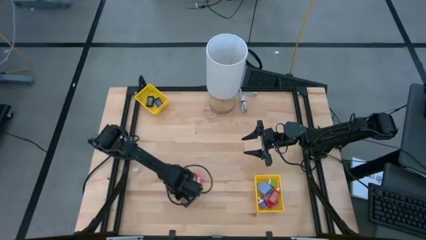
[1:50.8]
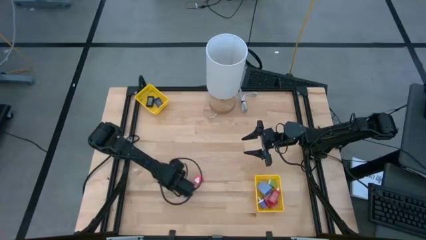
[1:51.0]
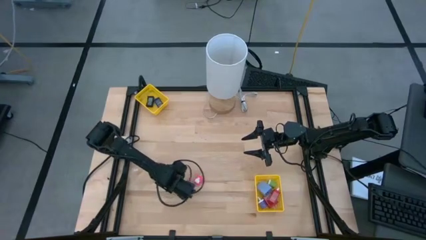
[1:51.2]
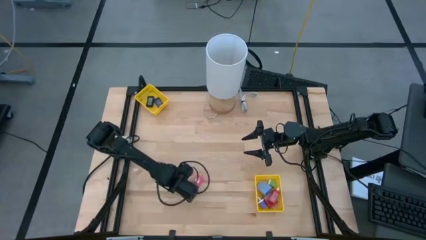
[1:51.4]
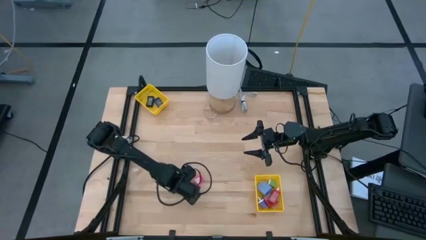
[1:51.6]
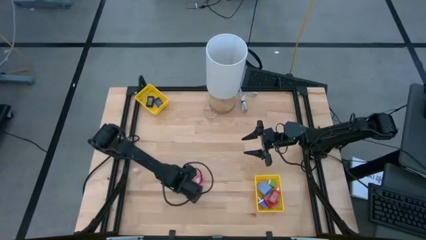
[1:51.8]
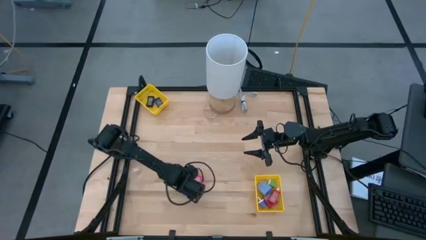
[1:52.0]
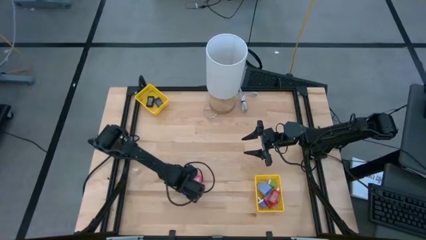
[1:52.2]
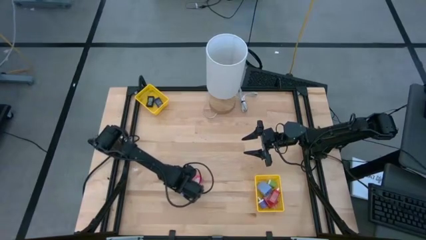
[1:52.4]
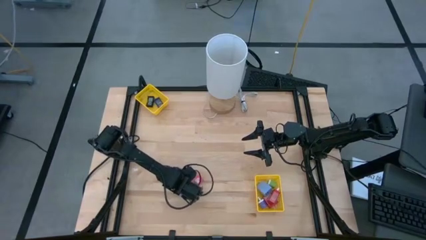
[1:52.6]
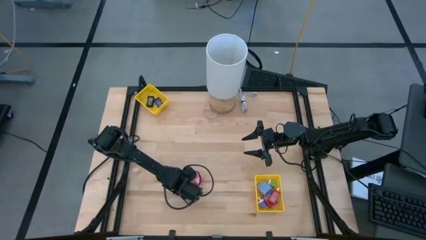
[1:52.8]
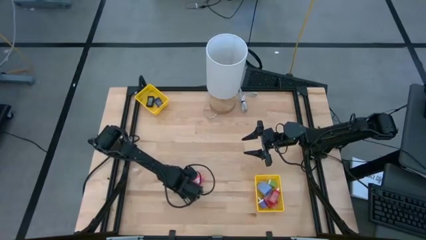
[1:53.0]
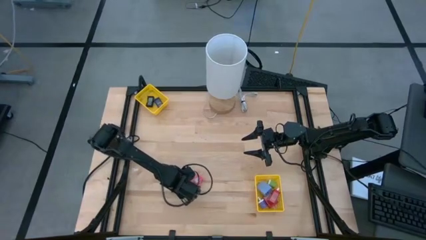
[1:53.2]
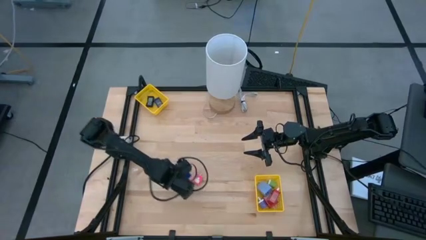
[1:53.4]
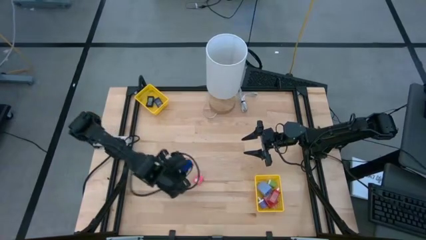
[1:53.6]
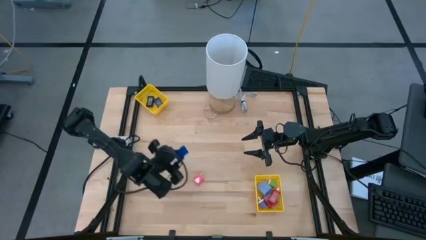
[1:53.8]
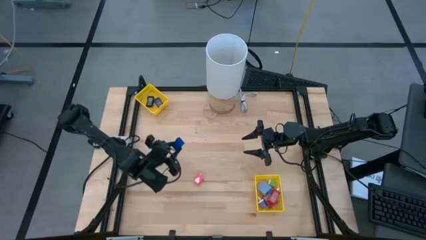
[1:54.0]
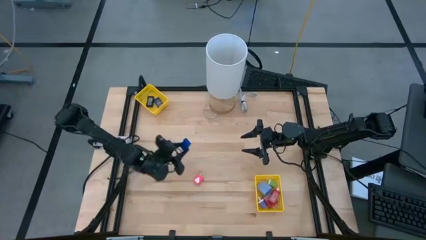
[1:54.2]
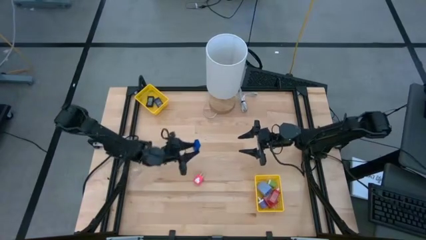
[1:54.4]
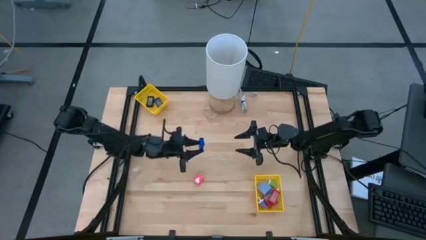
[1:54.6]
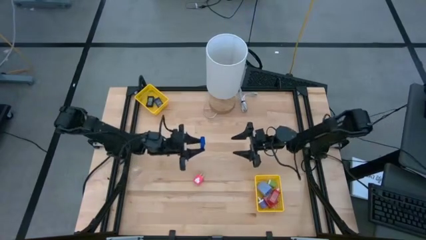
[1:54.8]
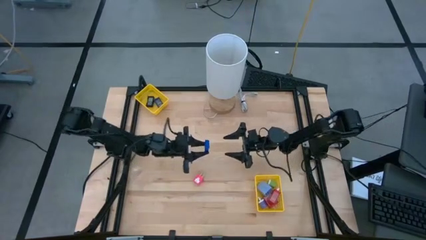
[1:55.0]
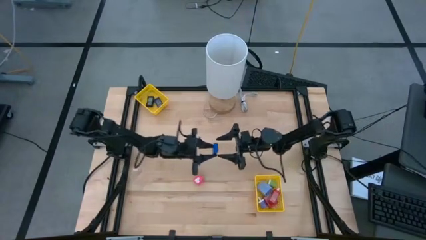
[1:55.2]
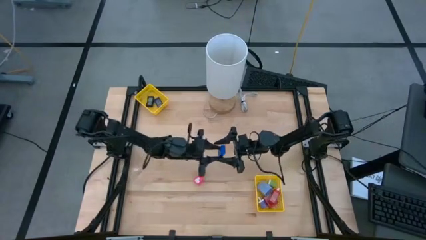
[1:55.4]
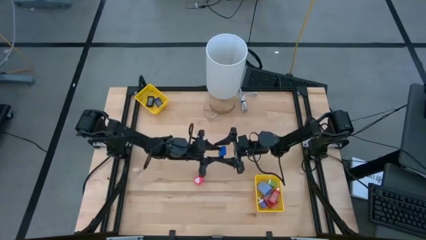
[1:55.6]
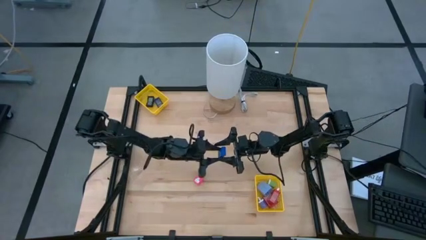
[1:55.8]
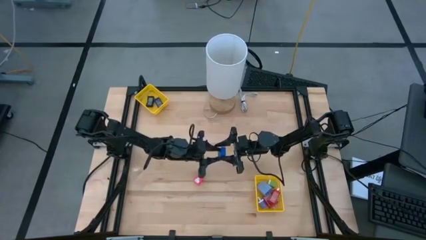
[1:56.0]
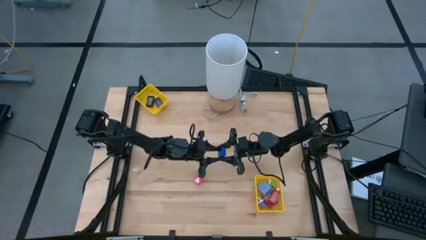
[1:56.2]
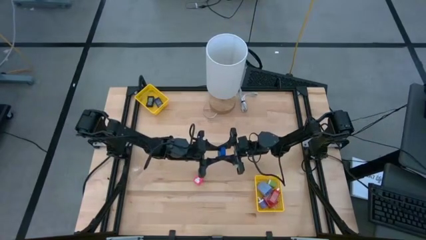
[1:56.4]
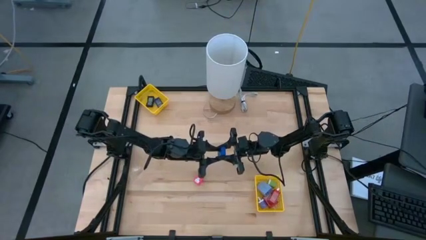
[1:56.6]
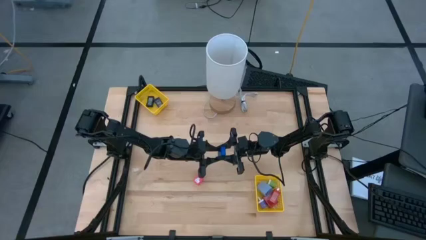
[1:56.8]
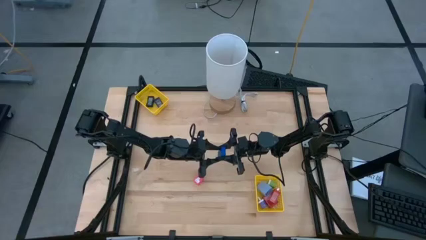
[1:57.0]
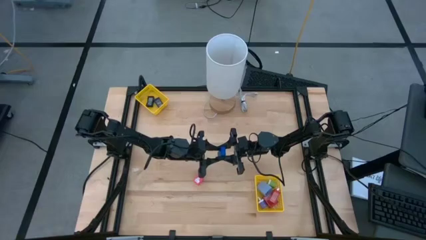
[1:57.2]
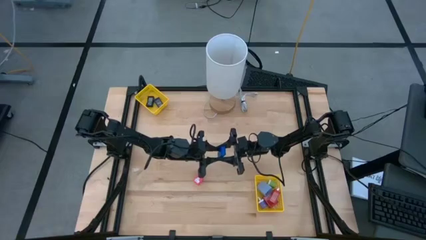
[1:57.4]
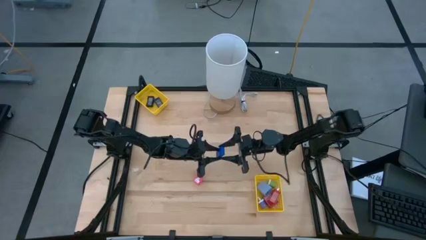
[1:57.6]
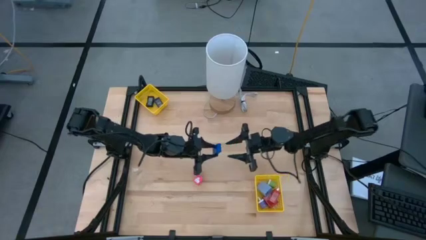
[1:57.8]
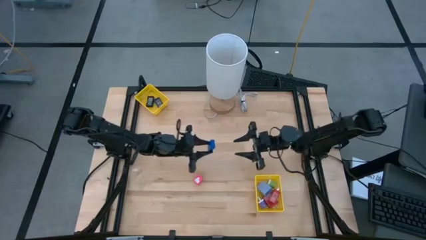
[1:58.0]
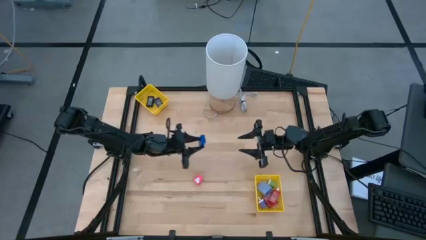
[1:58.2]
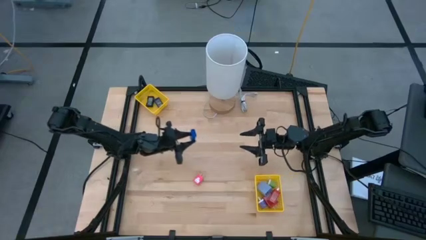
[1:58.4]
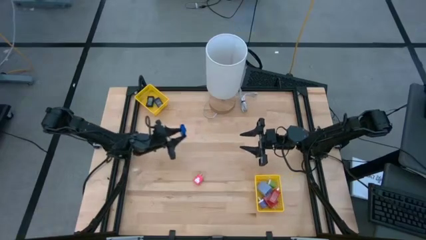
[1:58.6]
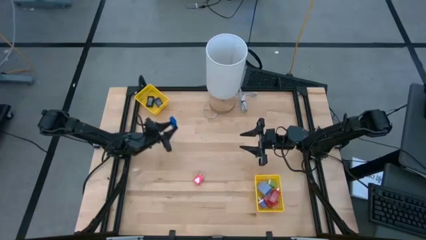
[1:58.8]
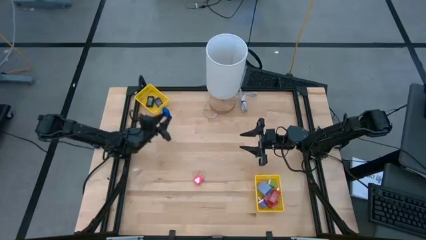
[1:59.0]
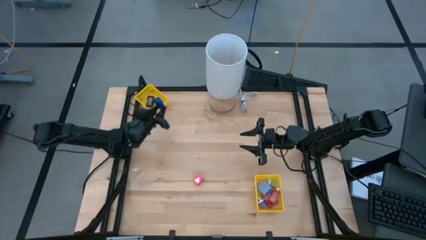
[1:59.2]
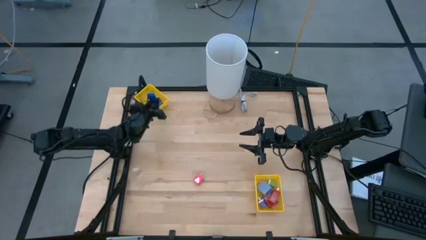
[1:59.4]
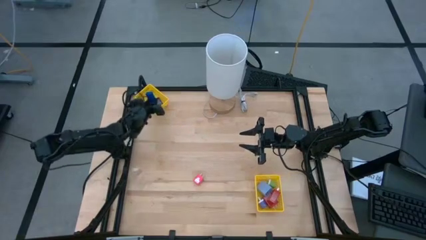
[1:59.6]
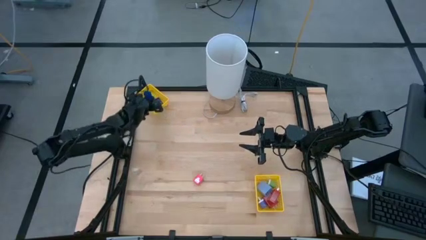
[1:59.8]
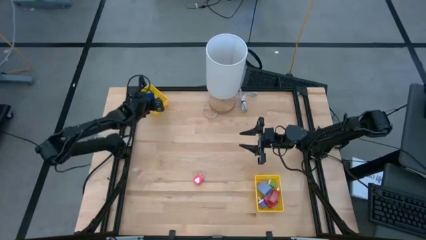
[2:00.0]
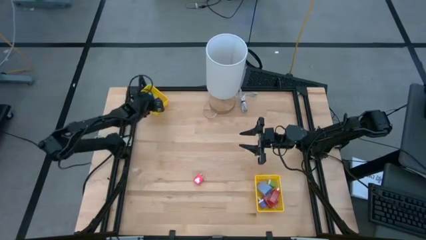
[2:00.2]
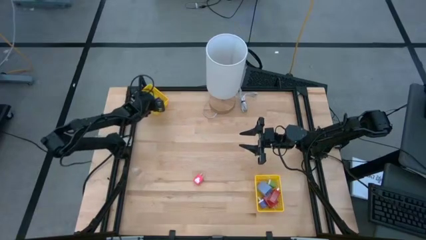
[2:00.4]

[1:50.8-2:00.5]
Task: Pick & Place Office items
Put the blue digital timer into the top yellow bin

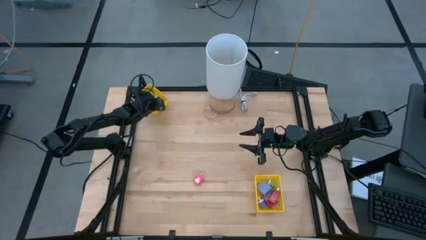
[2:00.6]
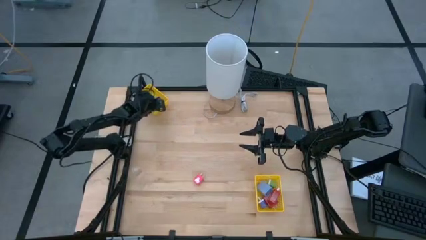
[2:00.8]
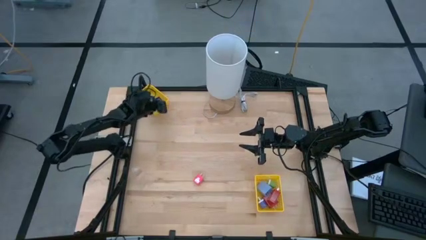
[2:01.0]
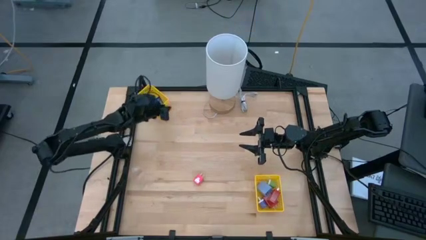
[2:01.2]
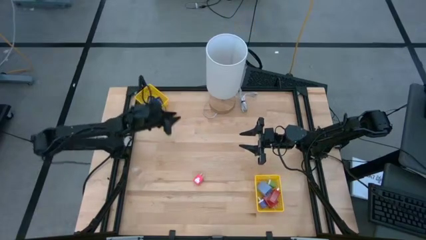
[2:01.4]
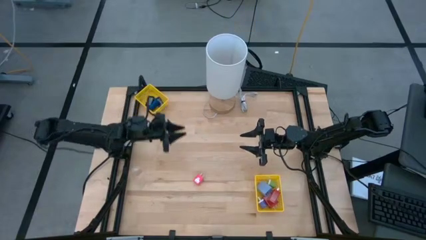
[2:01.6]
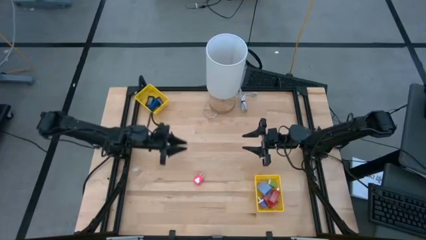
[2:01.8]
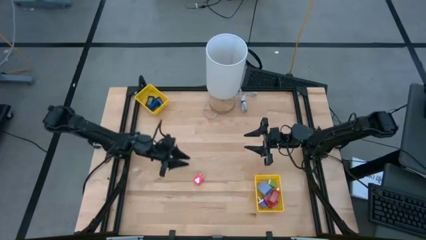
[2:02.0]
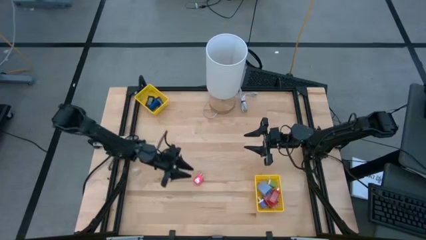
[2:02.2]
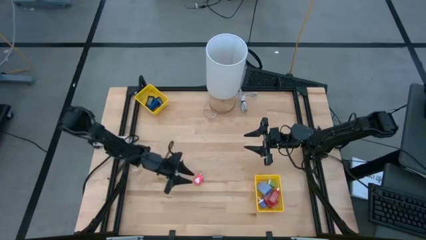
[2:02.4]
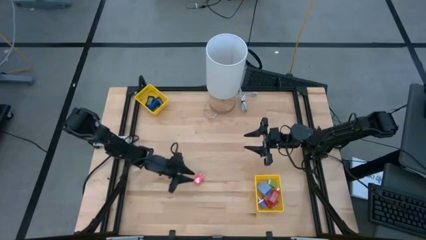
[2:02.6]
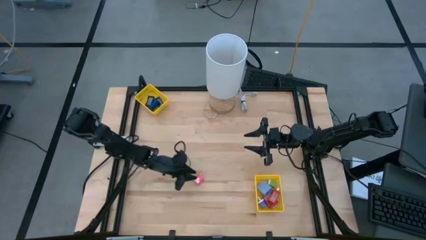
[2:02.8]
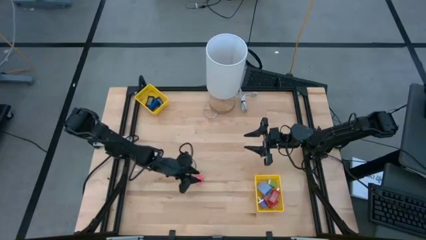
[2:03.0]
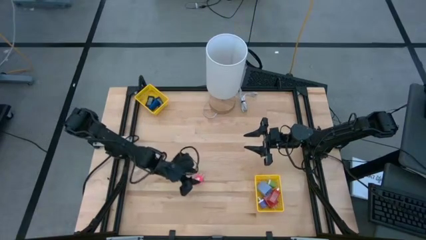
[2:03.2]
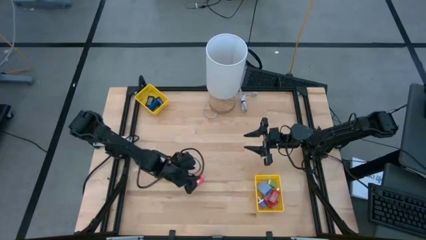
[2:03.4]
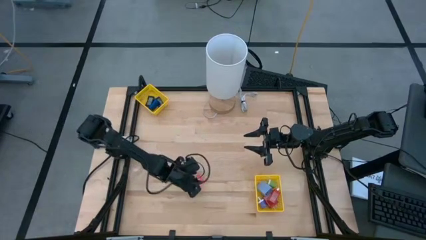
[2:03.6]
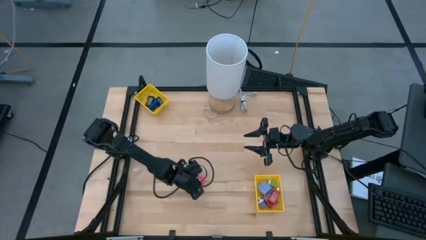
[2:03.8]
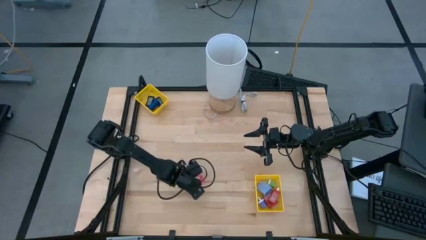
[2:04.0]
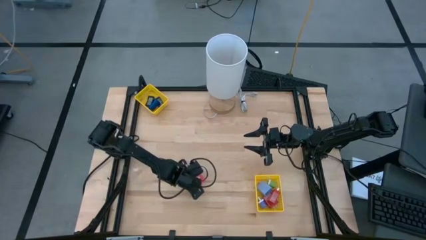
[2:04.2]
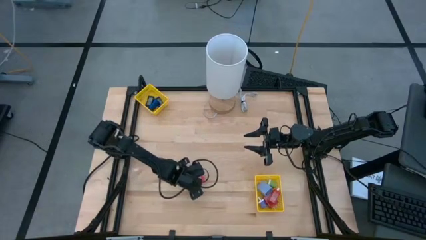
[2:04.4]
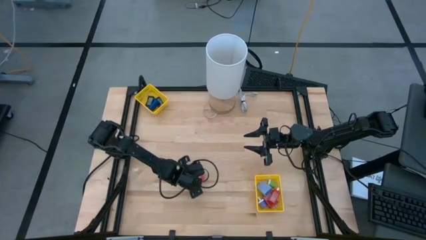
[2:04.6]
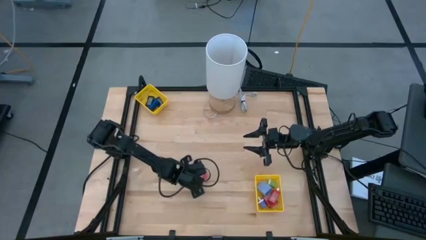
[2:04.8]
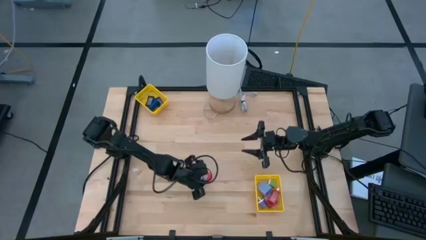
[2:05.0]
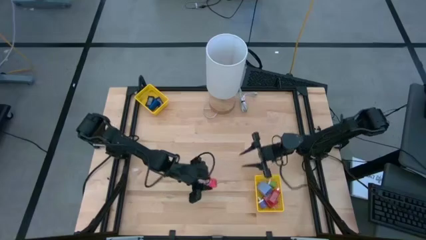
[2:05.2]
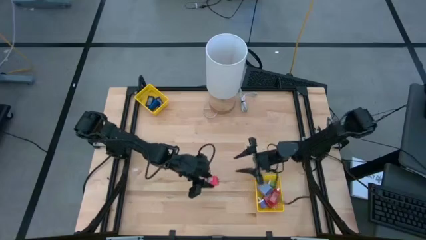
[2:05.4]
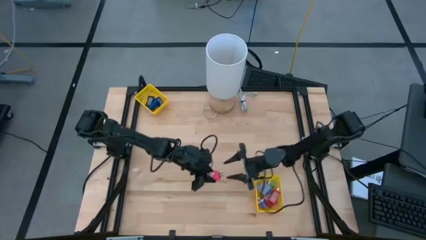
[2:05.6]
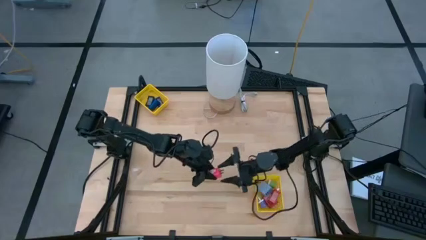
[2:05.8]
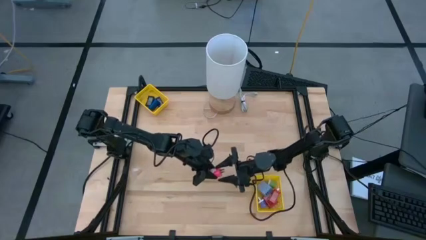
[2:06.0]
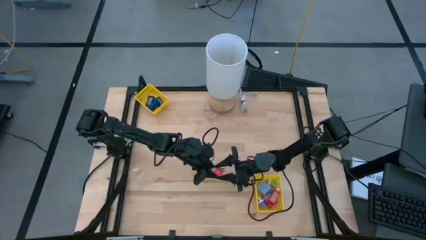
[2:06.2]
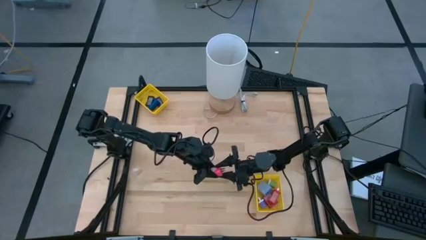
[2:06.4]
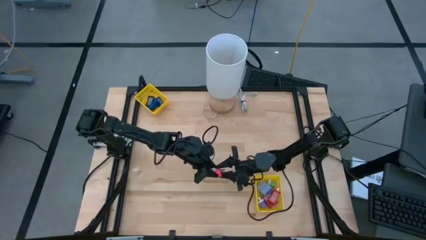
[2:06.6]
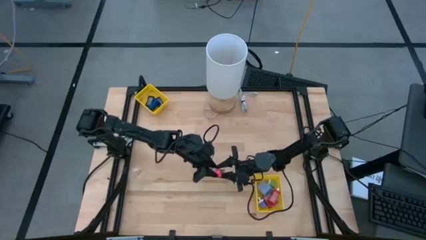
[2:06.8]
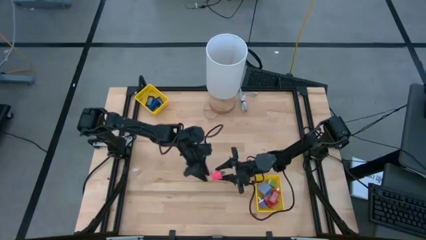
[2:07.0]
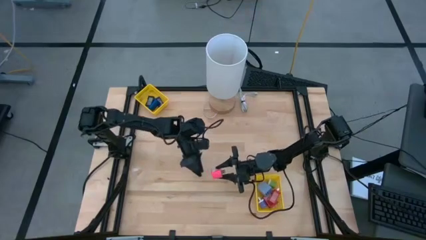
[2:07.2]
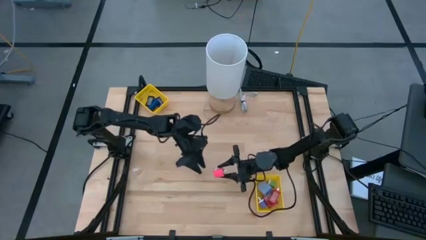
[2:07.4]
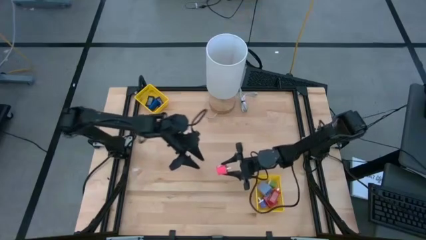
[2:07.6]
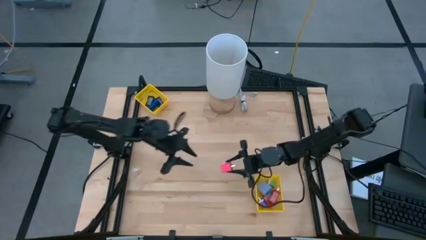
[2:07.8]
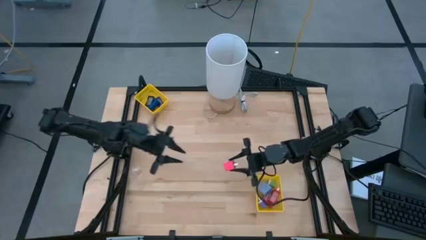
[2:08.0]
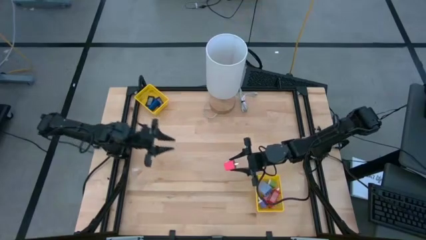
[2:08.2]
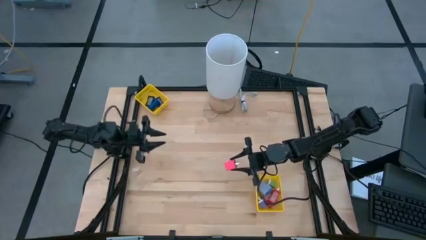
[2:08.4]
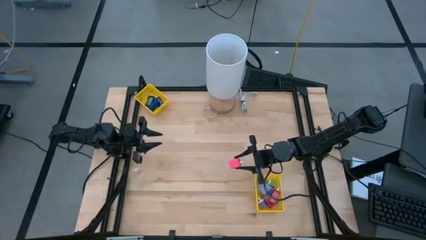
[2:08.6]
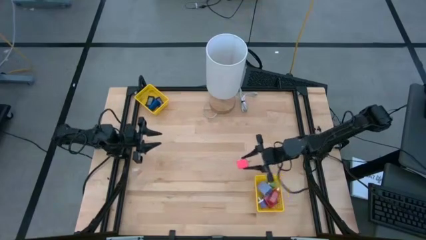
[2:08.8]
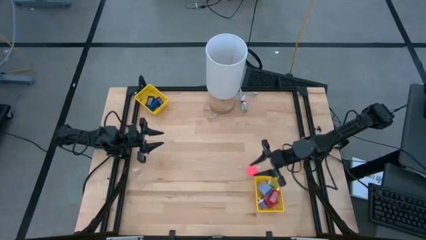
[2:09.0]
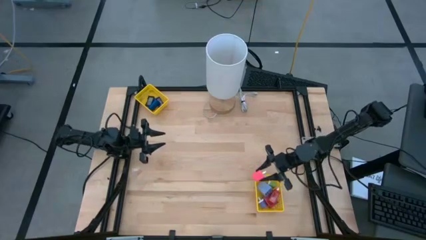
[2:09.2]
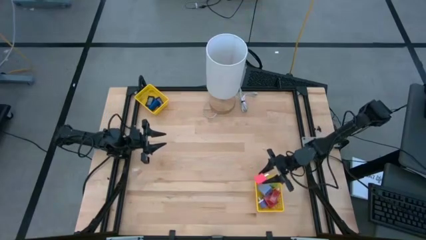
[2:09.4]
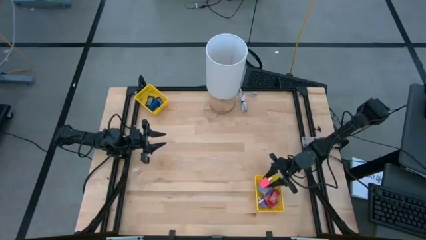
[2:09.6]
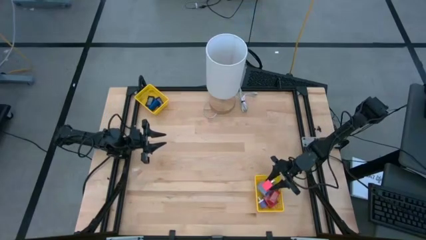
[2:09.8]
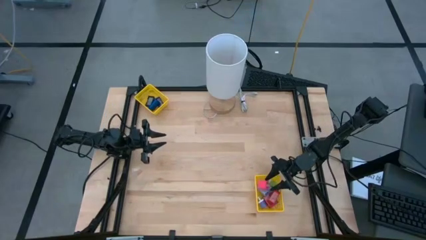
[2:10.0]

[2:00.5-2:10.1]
Put the pink charger adapter into the bottom yellow bin
